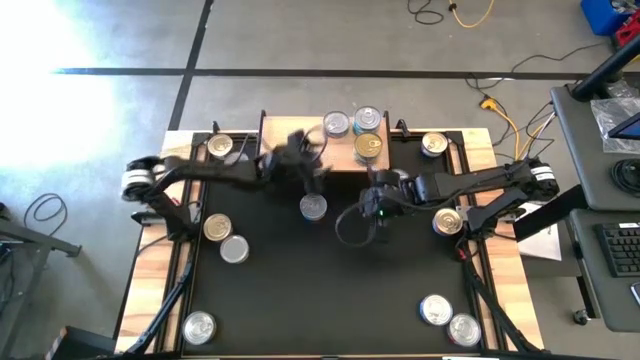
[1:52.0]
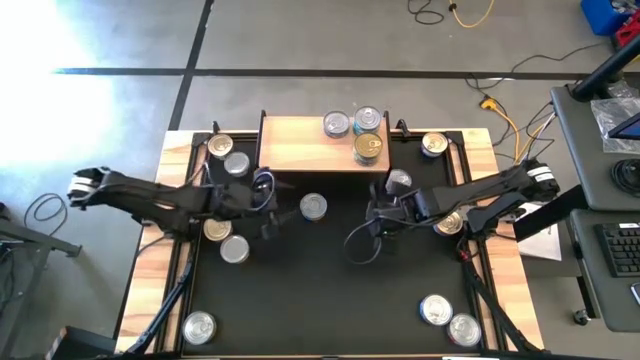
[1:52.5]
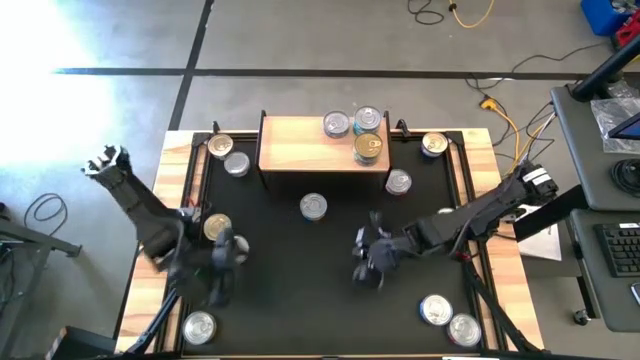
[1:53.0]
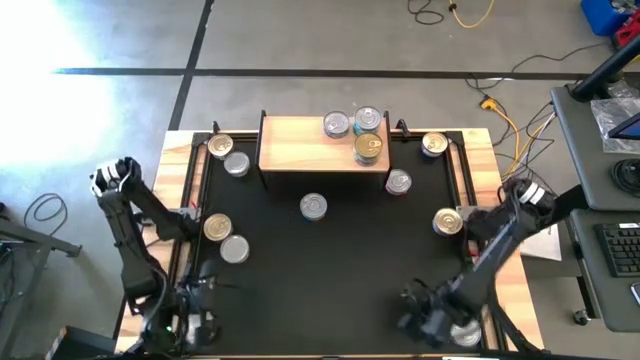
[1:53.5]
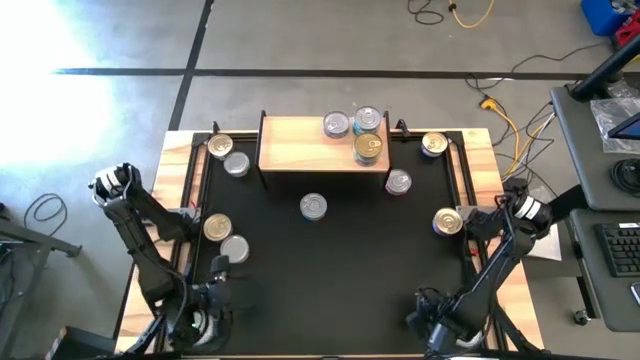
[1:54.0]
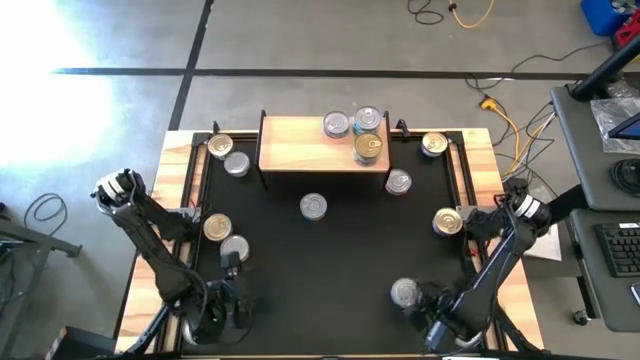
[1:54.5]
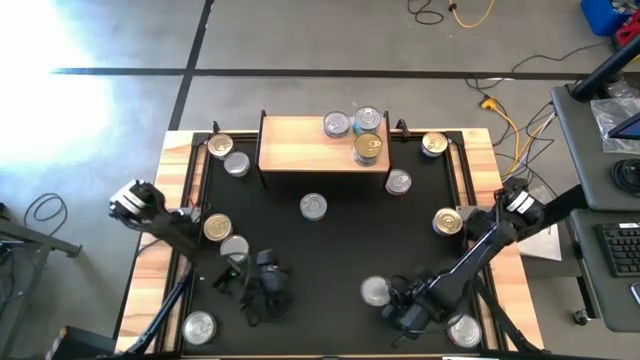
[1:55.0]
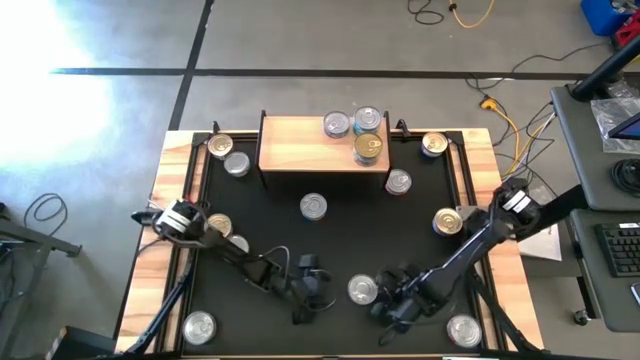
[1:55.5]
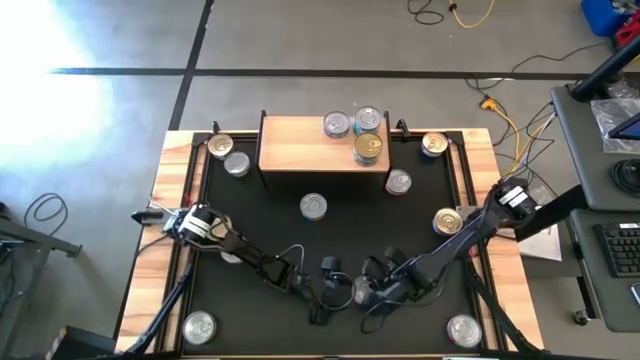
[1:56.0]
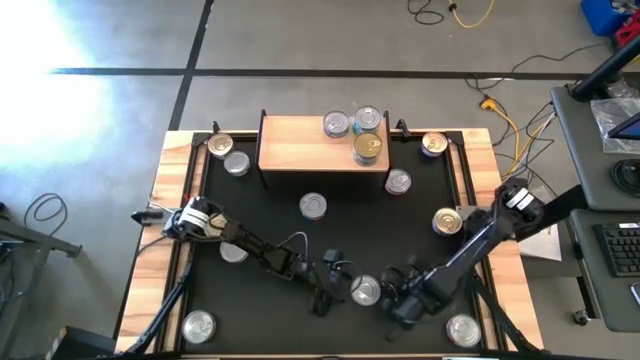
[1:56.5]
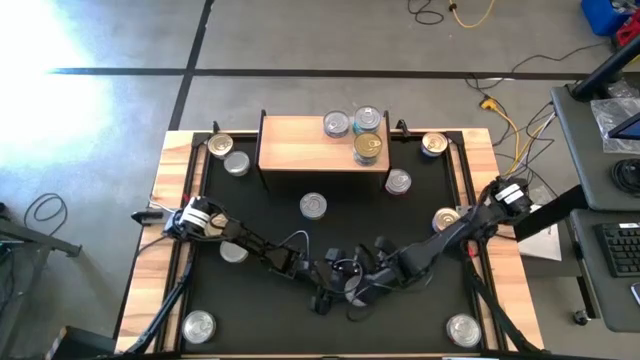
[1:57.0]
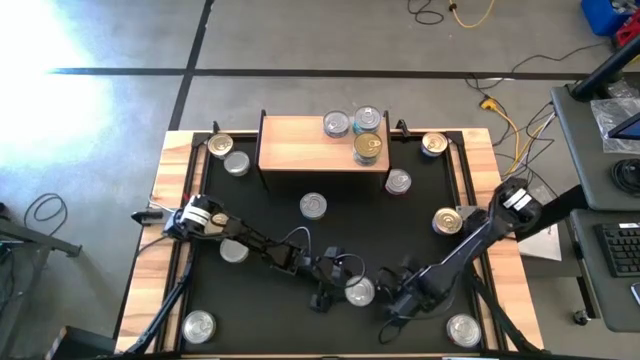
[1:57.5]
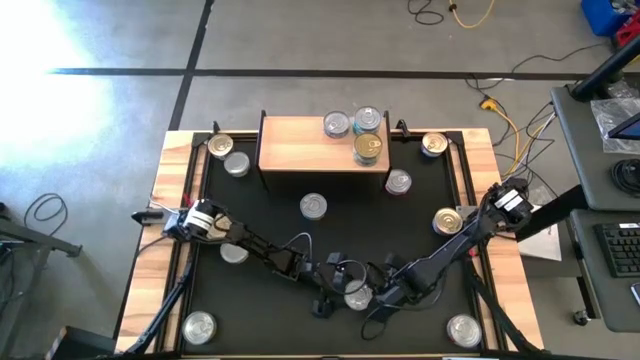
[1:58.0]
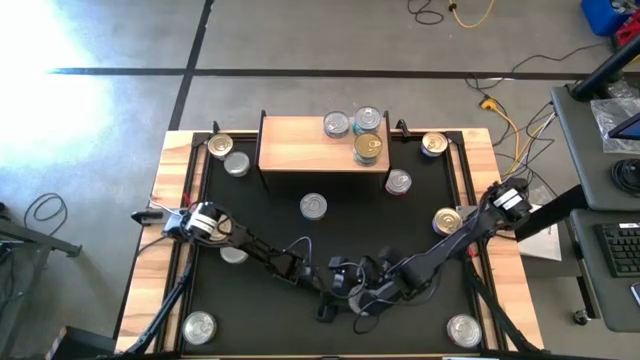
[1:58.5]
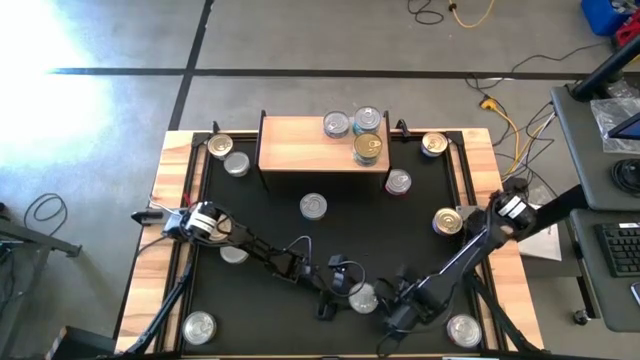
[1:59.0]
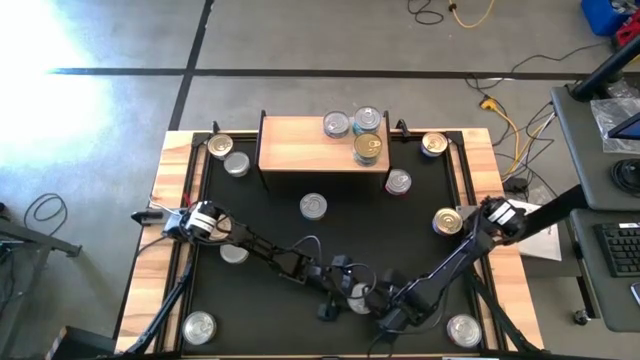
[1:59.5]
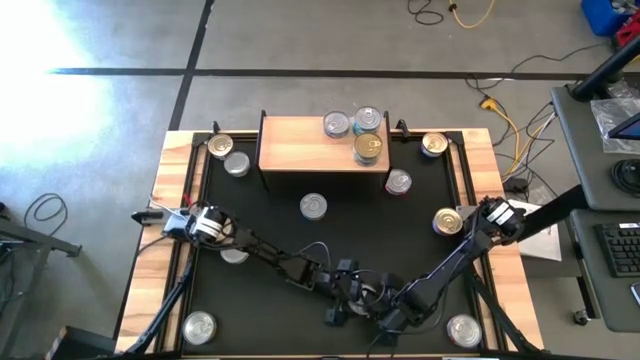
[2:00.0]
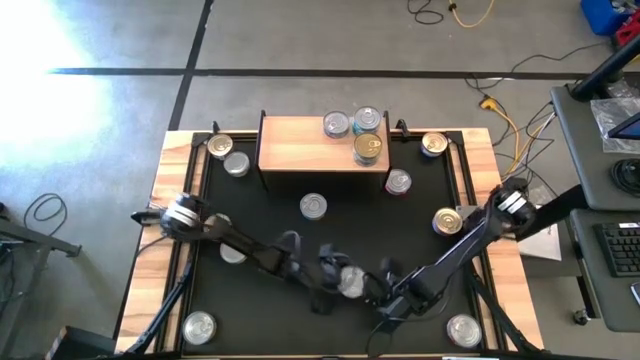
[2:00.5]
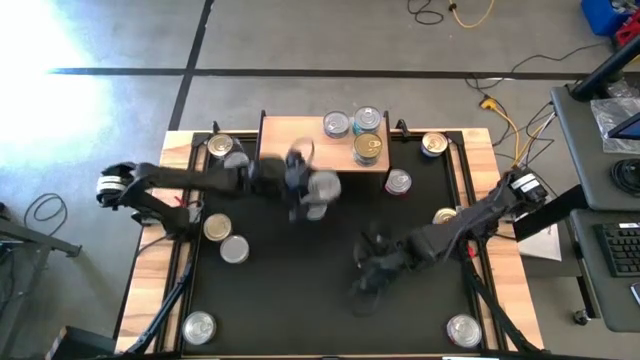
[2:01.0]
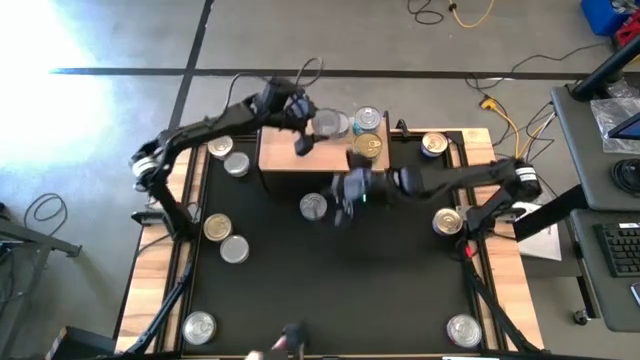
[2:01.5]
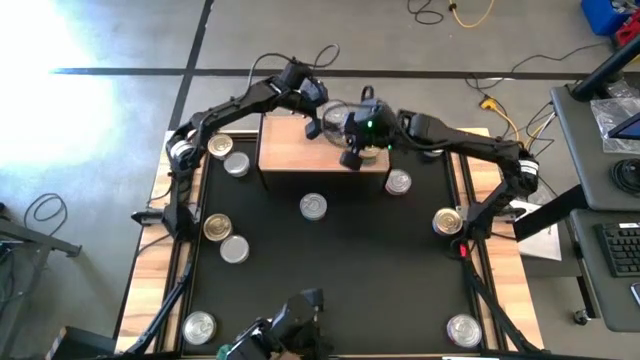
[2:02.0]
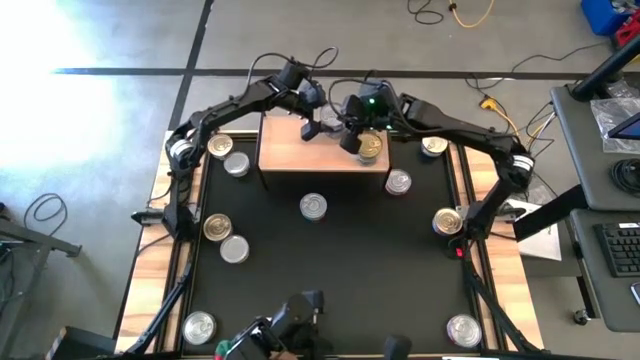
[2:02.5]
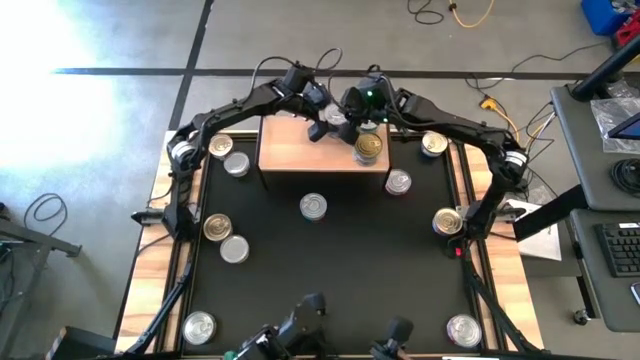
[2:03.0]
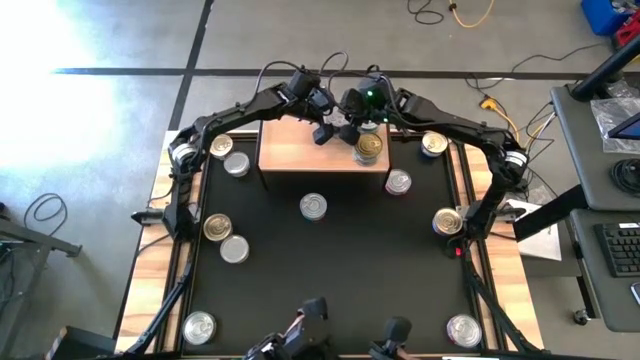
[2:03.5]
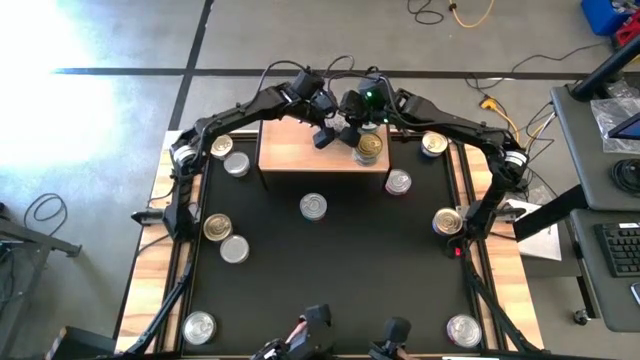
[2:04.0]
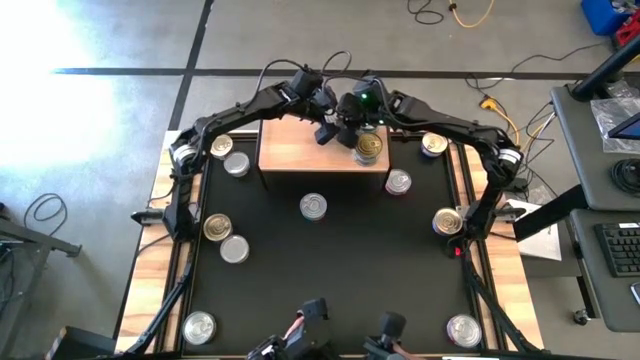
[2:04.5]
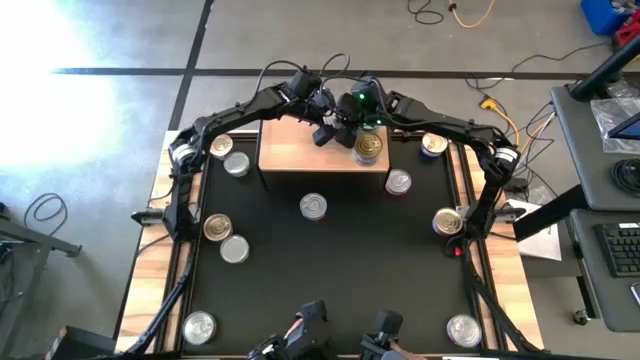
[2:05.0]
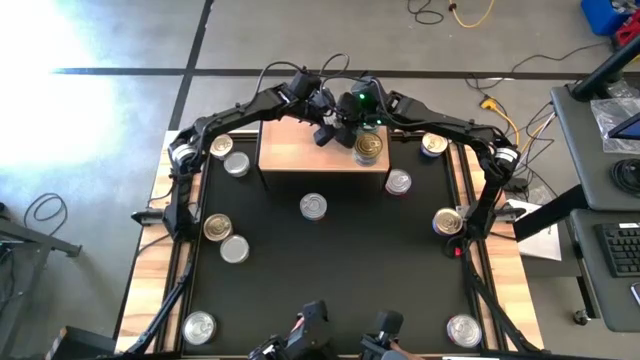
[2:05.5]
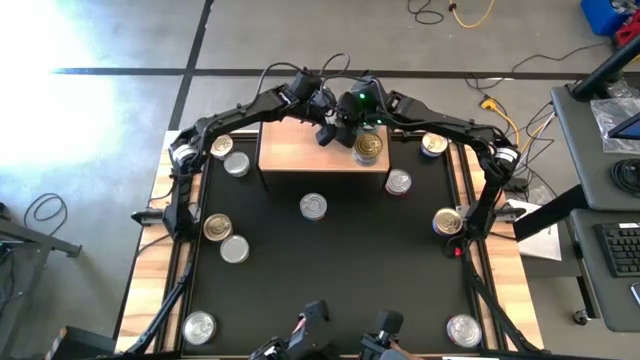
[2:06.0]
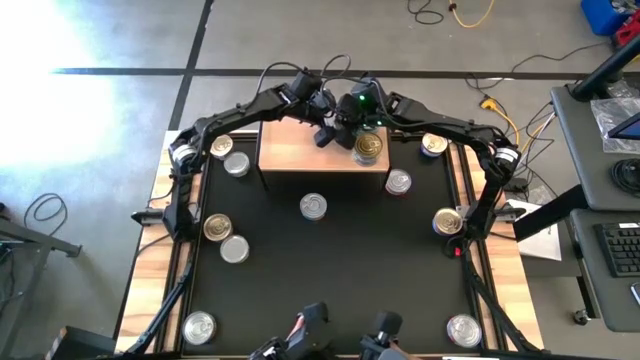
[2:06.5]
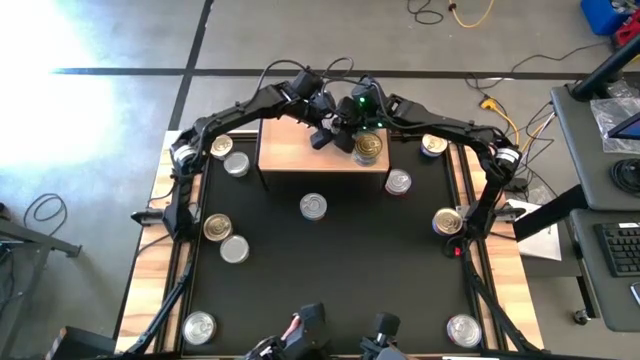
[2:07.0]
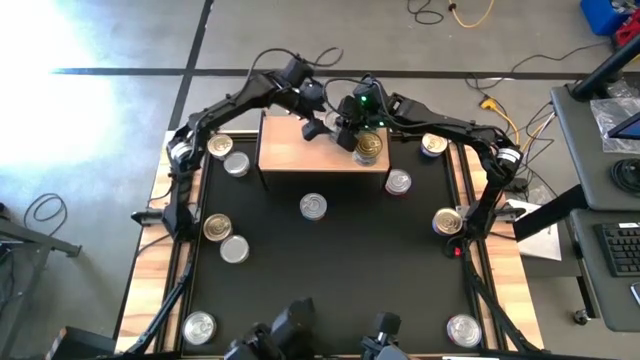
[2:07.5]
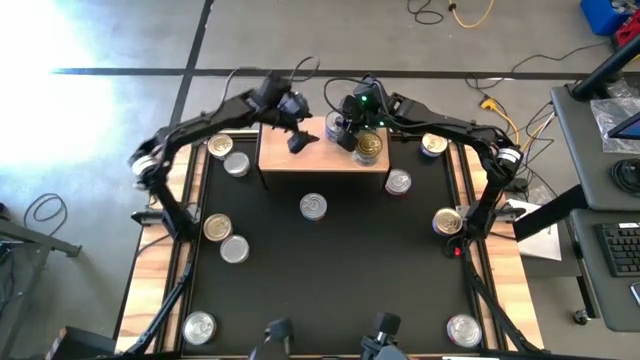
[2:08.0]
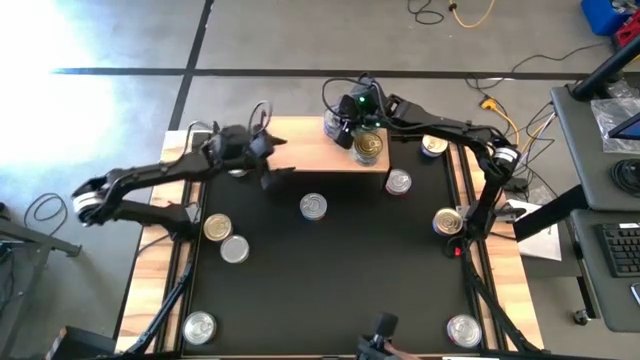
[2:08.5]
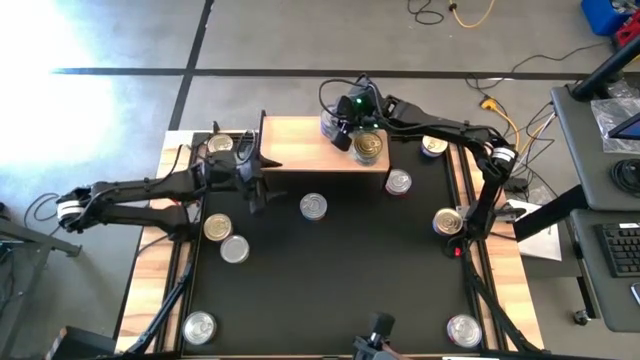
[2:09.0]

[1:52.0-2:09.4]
Task: Stack canned seafood by type on shelf
Stack the dark blue tuna can on top of the dark blue tuna can on the shelf

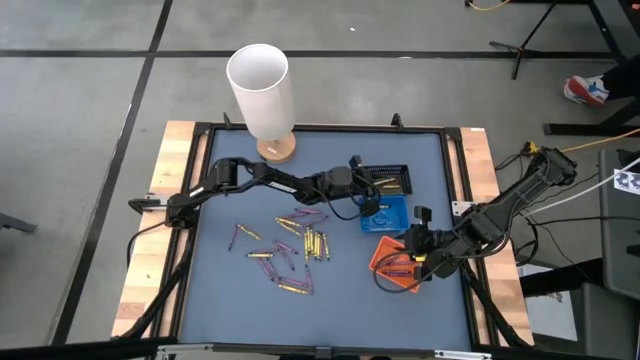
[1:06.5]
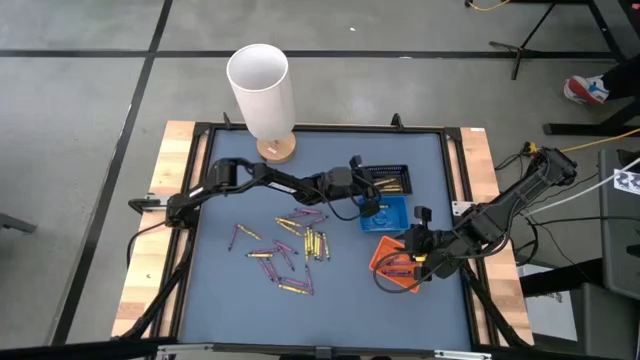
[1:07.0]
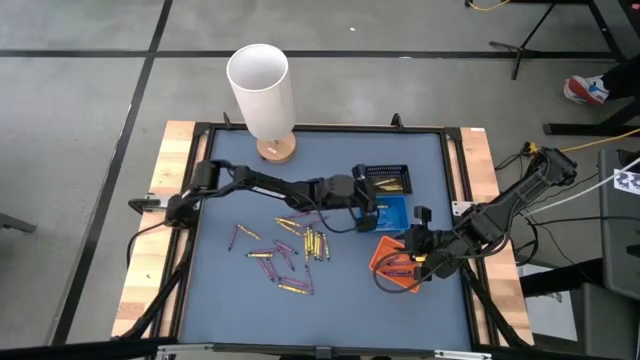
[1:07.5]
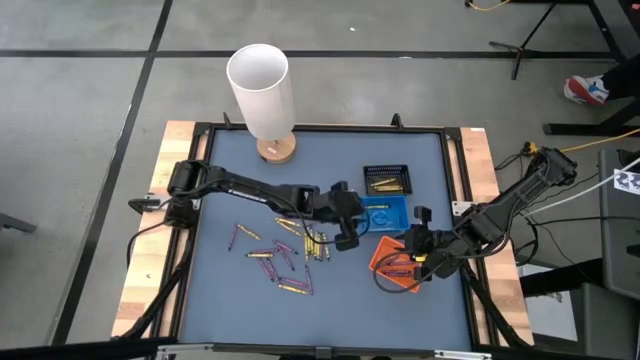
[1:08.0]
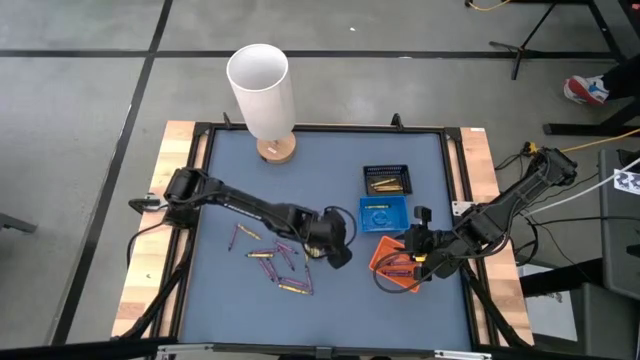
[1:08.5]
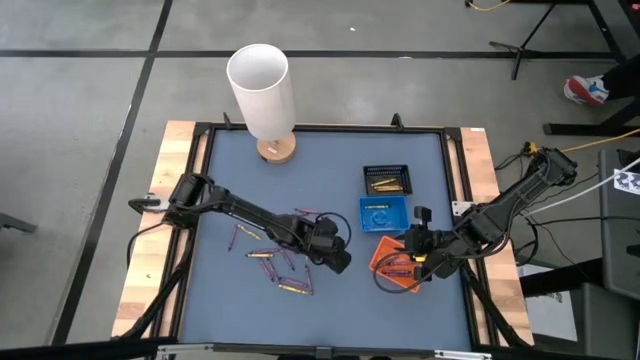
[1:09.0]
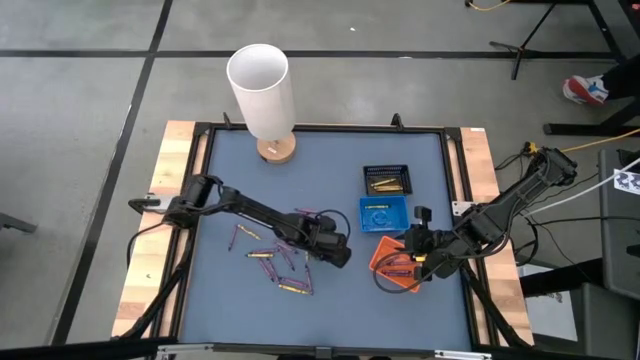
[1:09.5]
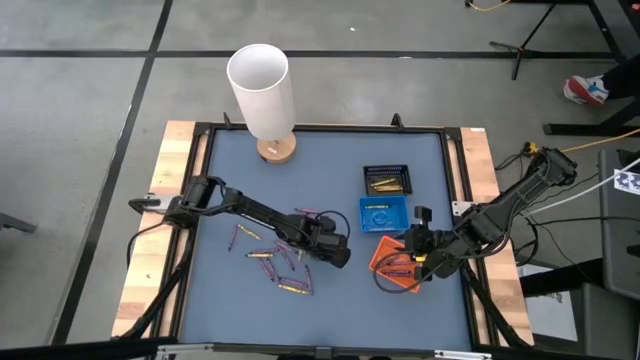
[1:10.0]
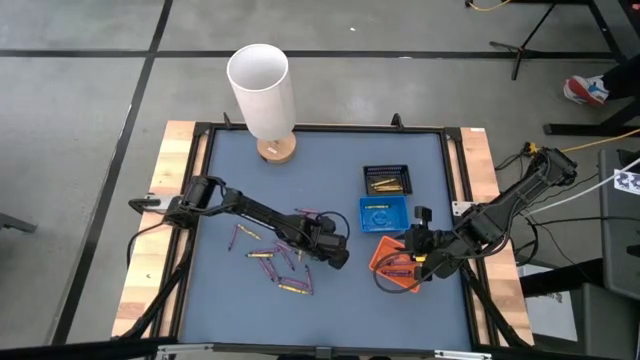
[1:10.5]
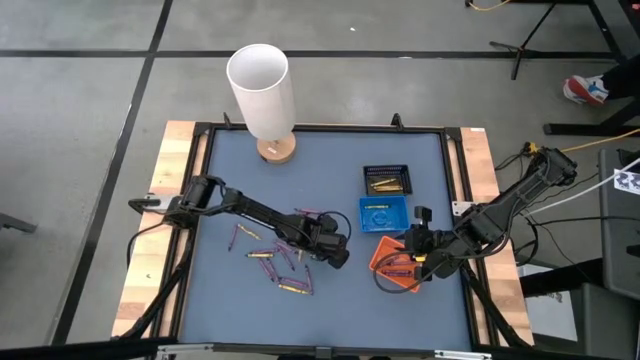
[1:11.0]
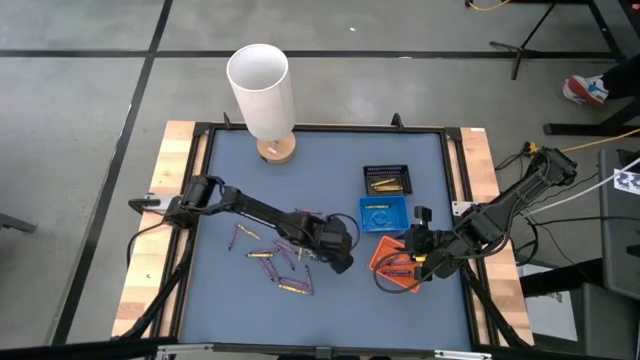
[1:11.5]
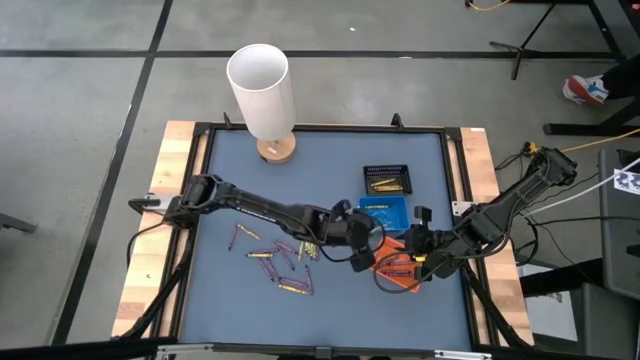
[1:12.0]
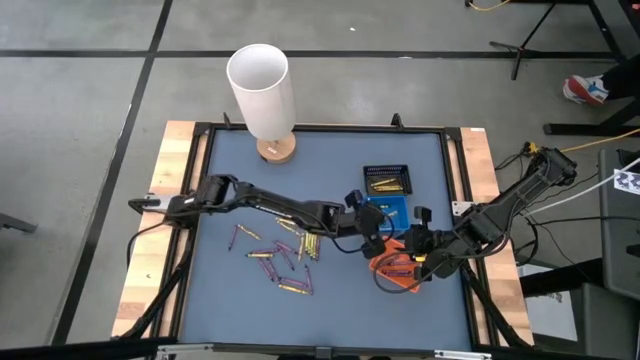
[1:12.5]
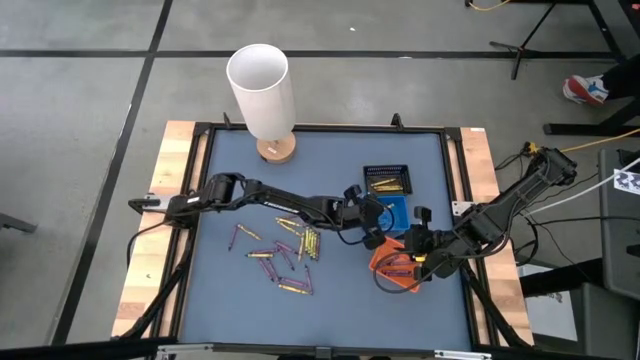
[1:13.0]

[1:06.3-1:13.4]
Task: Sort crayons
Put the green crayon into the blue bin
